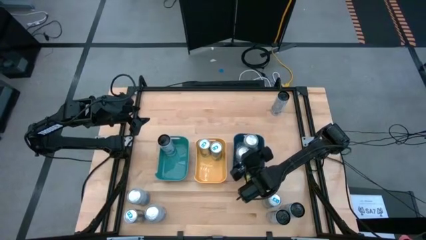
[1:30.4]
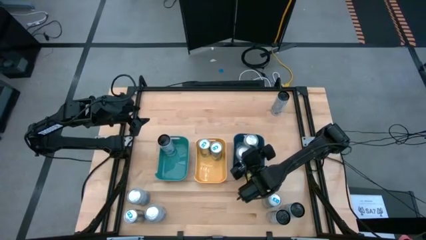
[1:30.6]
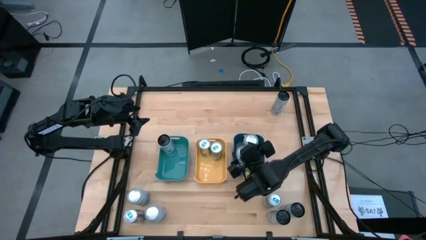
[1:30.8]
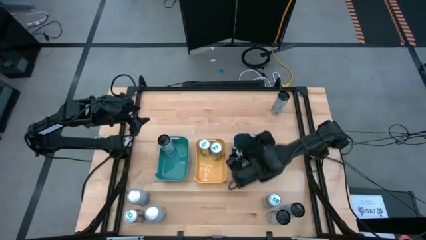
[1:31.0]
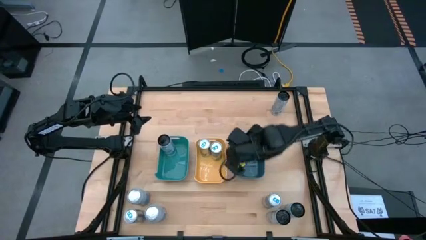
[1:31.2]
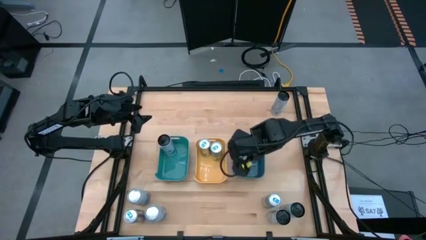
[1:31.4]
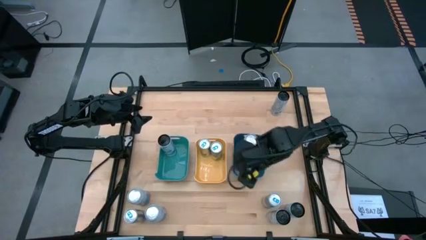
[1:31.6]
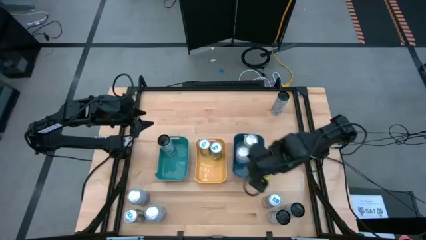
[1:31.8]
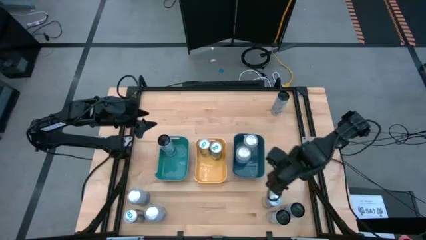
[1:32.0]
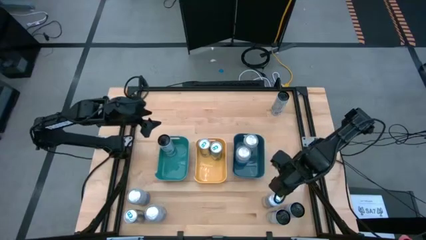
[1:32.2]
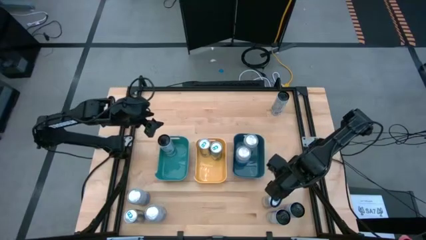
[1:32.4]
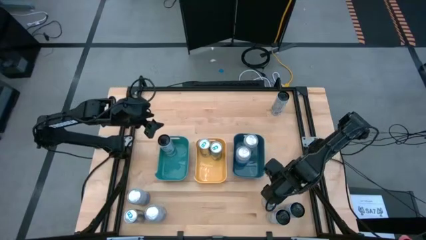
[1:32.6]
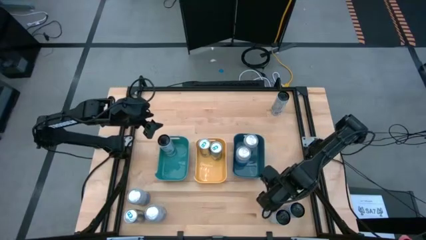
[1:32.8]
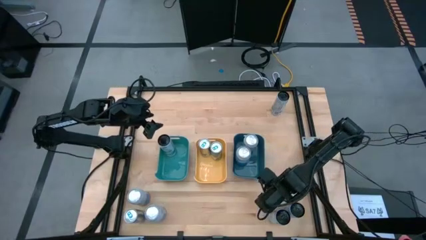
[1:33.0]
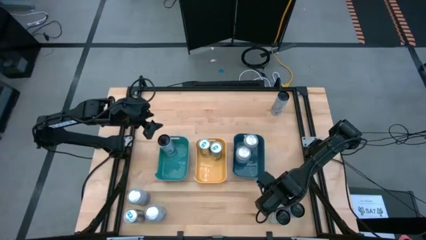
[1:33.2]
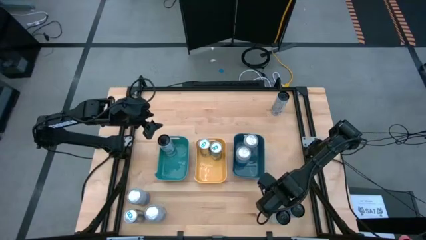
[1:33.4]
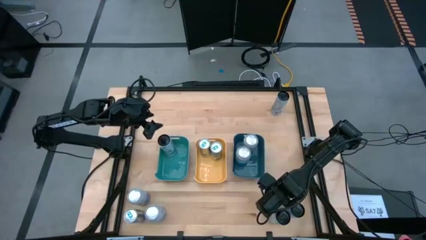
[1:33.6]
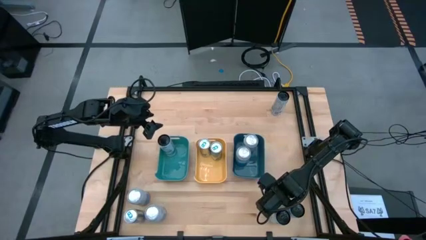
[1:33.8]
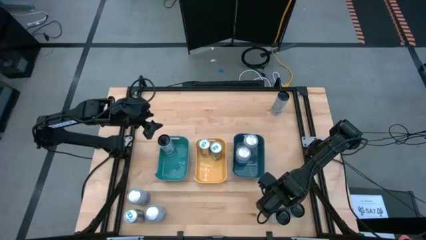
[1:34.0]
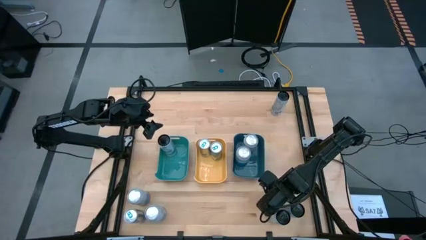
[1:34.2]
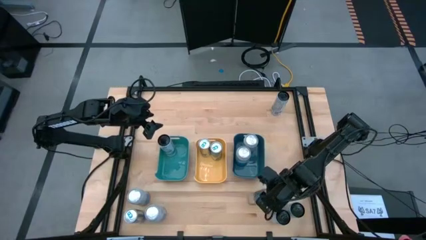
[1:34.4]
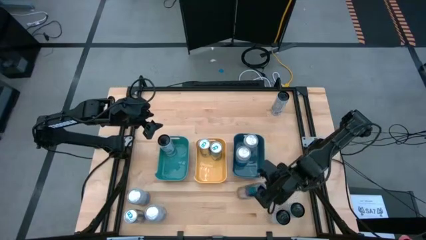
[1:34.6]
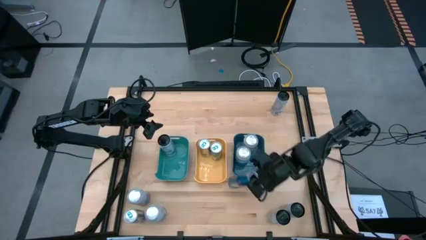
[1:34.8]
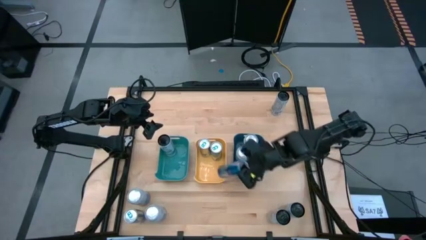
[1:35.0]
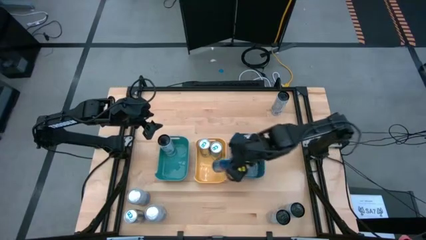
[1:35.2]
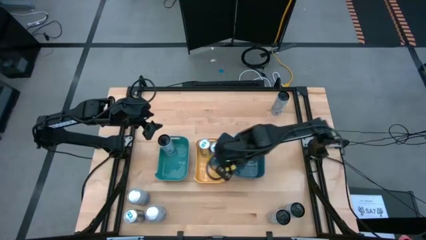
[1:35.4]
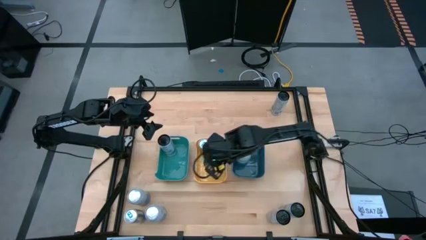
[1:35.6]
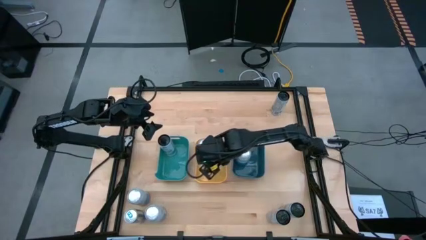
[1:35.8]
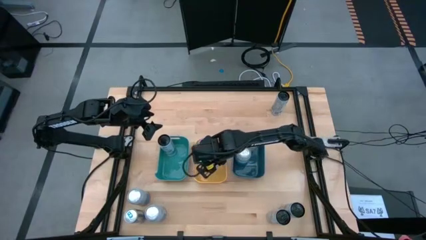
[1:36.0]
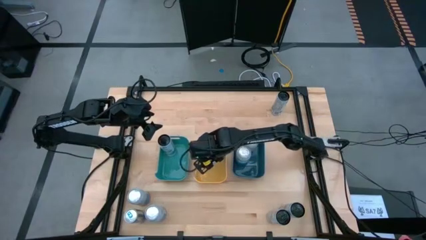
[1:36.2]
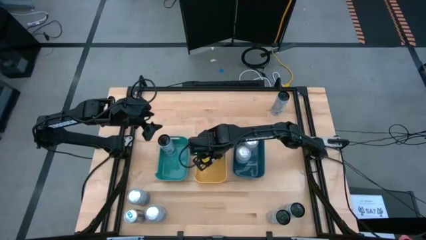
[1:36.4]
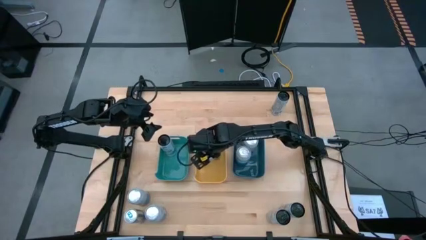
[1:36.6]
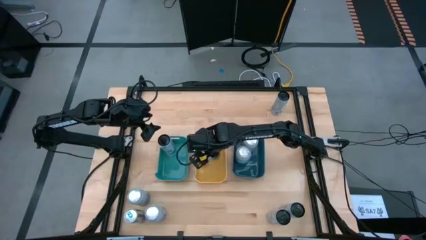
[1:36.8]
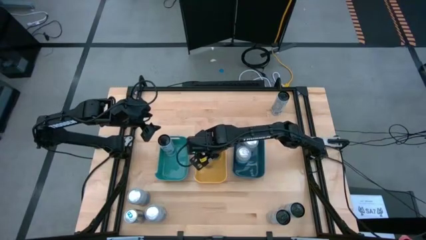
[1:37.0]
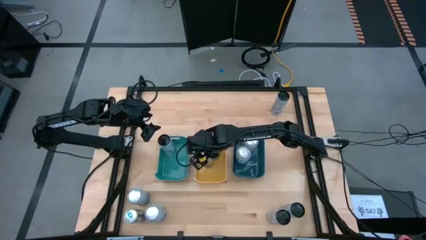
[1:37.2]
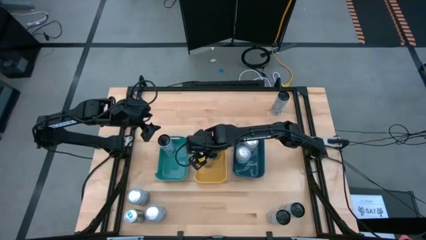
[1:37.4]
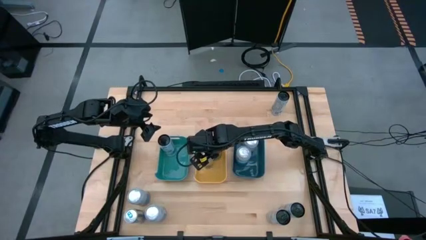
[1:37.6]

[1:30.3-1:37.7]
Task: Sort soda cans
Put the left blue can into the yellow bin

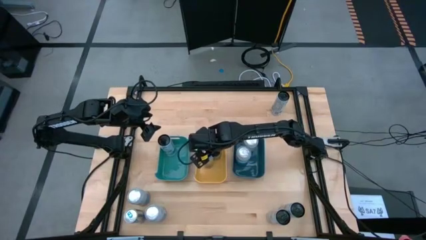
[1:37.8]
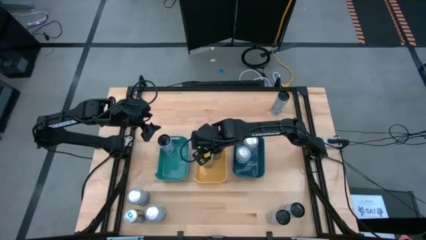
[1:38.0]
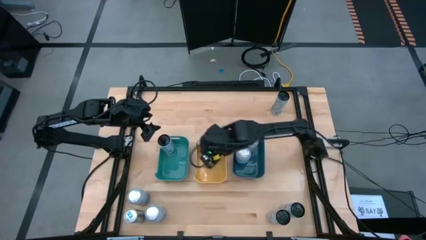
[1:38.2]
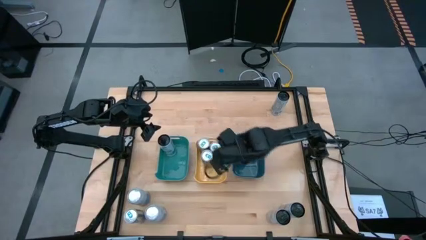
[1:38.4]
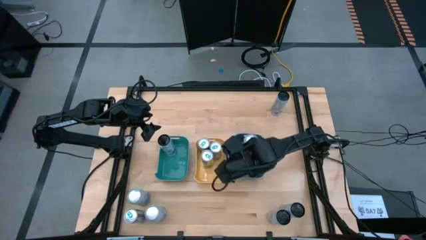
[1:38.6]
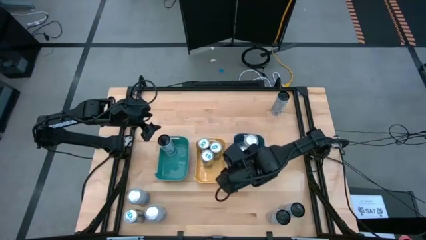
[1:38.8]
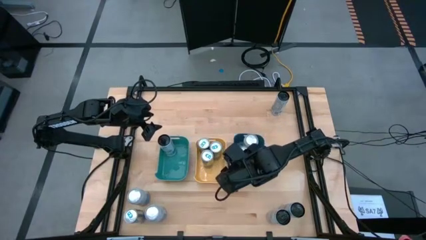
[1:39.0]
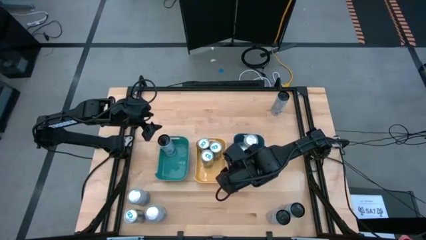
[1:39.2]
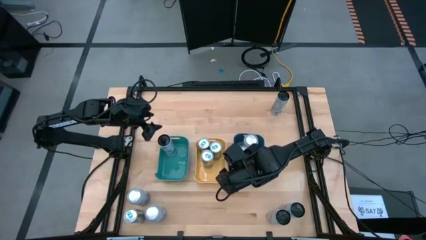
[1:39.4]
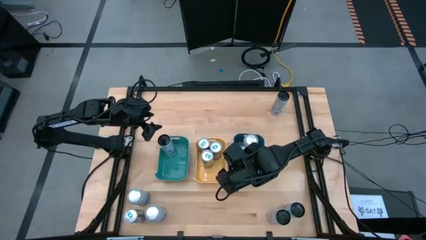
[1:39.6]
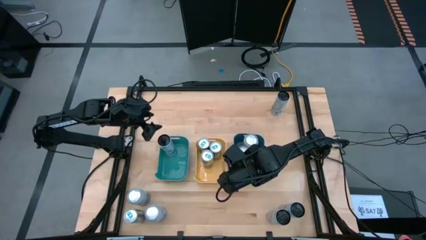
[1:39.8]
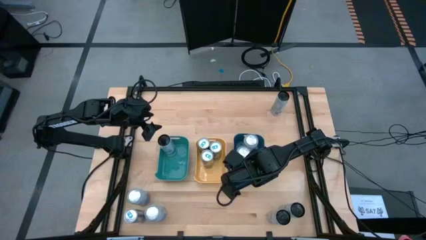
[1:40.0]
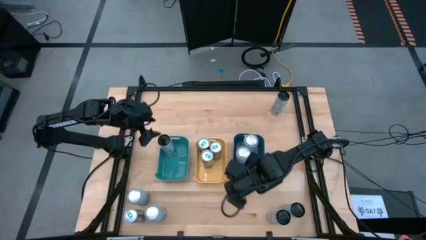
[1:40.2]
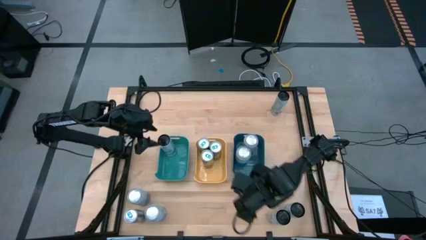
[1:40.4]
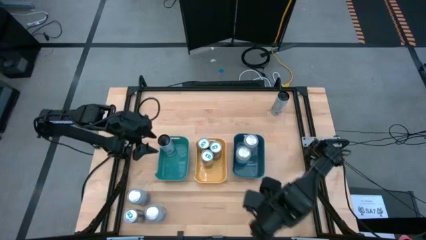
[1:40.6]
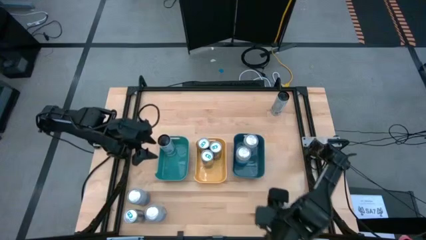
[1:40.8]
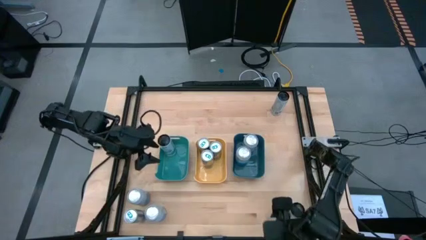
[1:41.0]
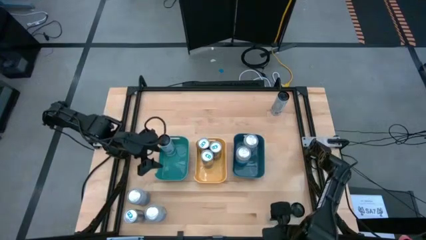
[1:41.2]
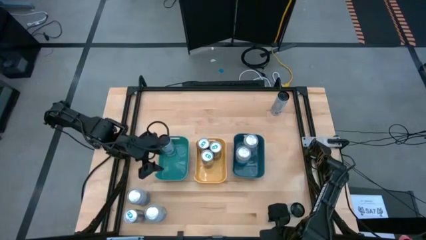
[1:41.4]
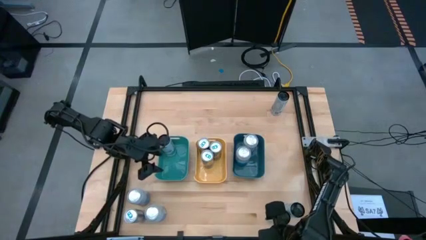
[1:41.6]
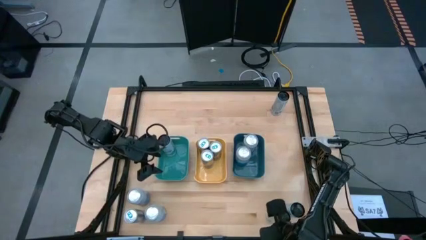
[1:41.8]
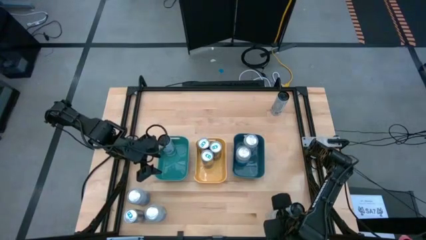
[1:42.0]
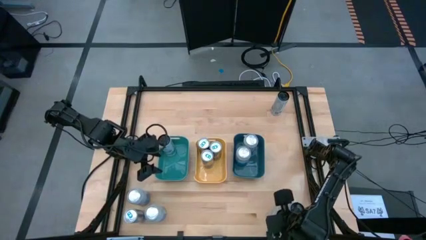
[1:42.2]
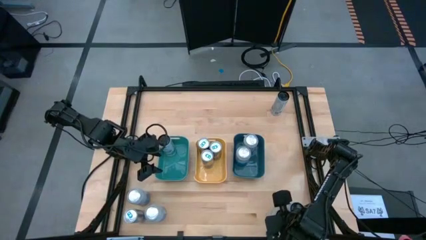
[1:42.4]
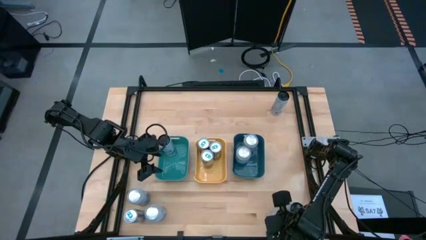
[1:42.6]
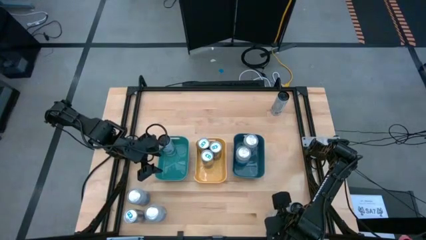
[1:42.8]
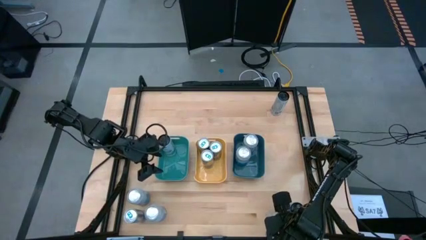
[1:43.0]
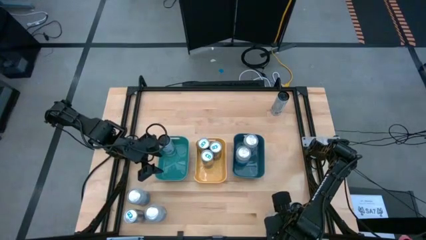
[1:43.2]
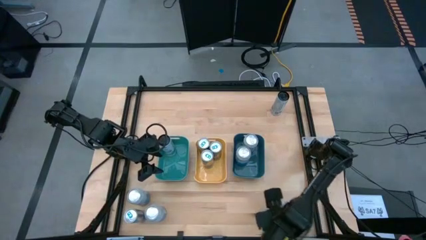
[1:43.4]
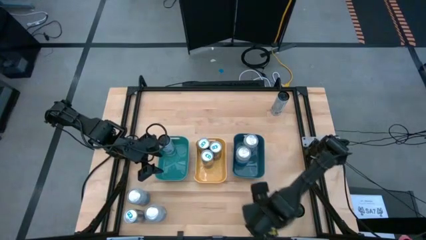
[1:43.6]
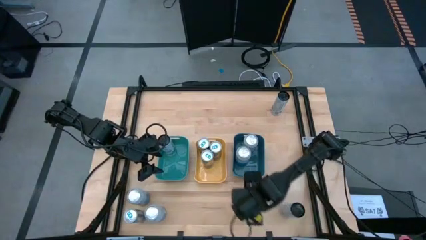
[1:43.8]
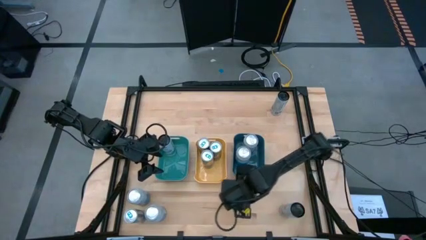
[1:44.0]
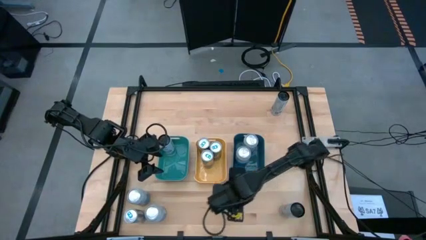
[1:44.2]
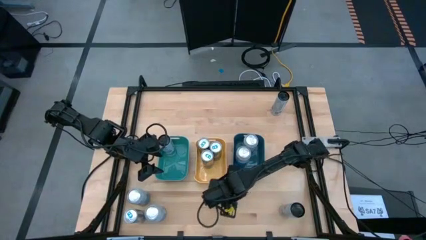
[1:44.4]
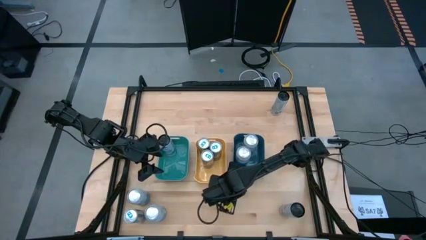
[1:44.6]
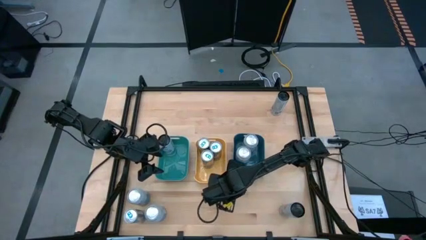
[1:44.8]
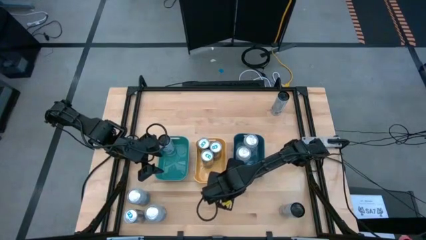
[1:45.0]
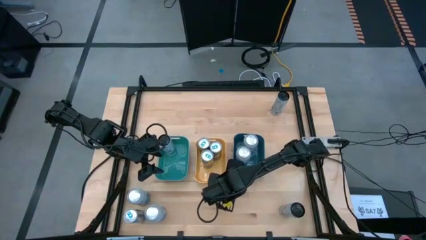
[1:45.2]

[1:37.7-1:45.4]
Move the bottom left black can to the lower middle of the table
